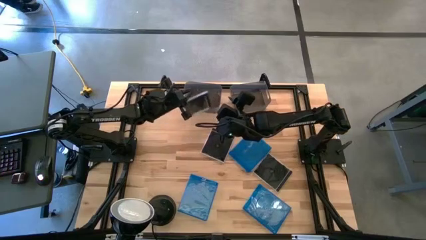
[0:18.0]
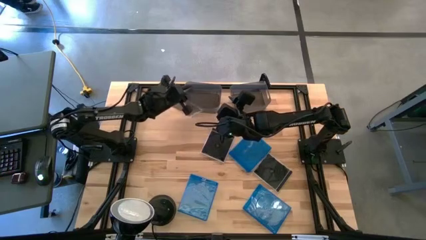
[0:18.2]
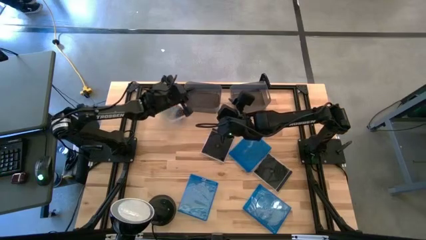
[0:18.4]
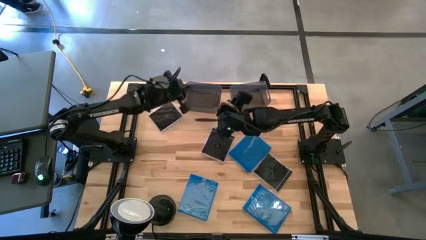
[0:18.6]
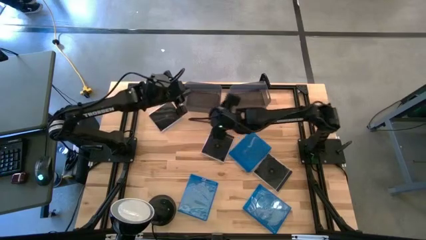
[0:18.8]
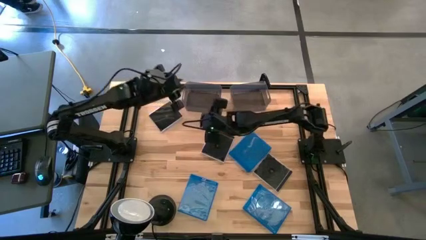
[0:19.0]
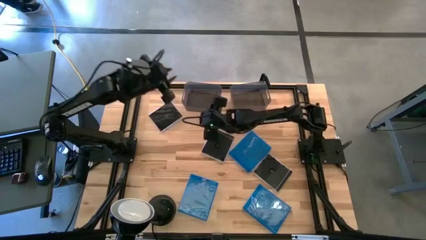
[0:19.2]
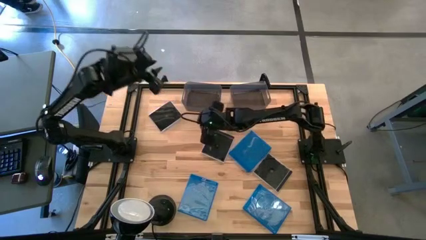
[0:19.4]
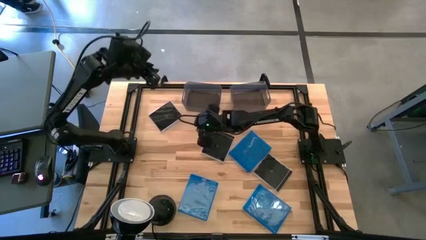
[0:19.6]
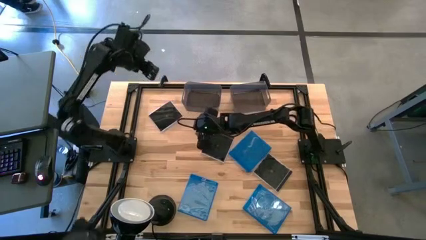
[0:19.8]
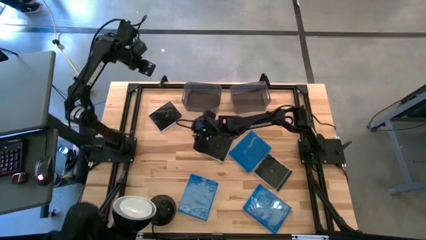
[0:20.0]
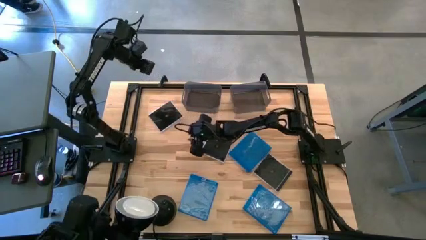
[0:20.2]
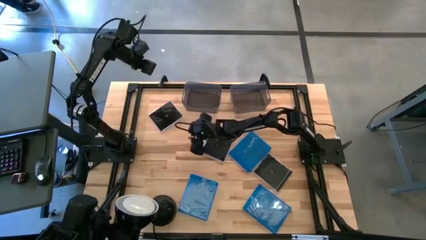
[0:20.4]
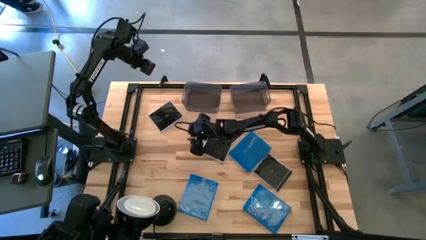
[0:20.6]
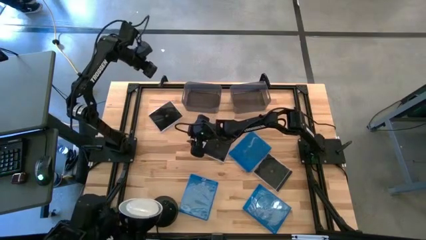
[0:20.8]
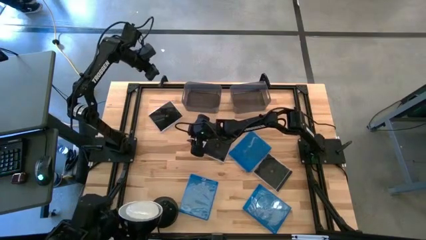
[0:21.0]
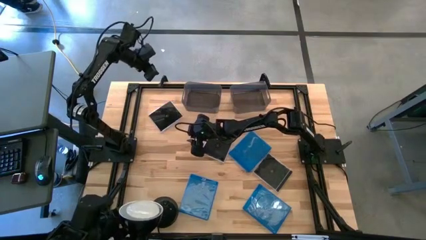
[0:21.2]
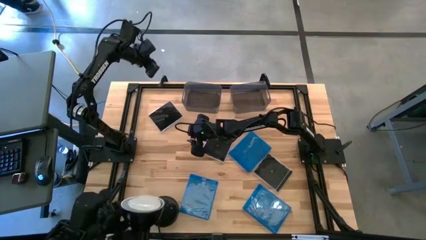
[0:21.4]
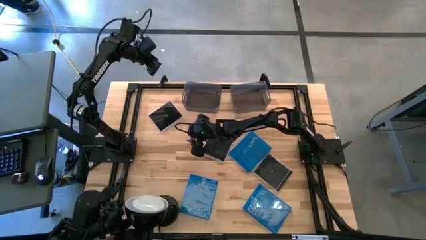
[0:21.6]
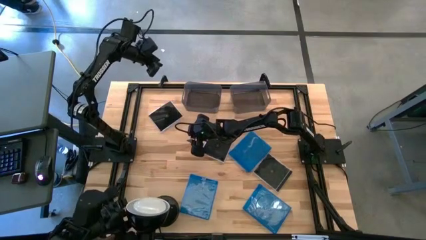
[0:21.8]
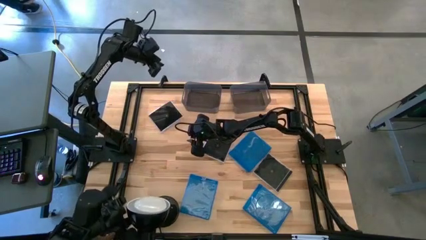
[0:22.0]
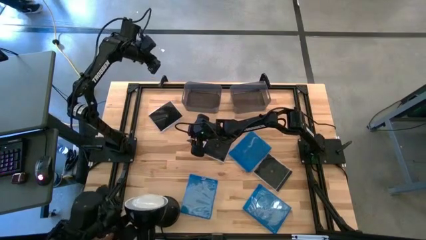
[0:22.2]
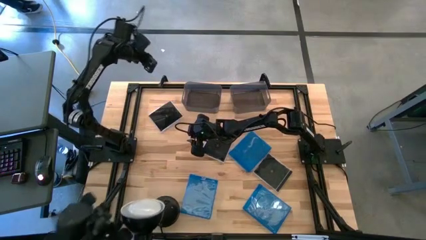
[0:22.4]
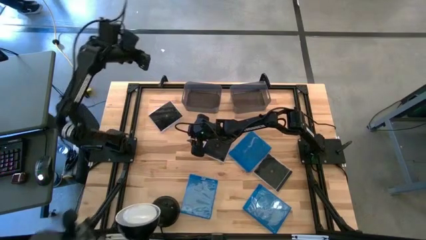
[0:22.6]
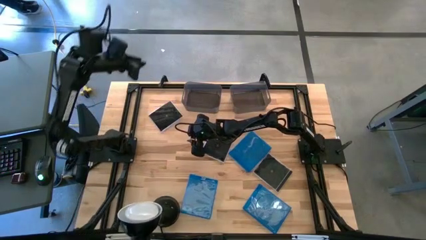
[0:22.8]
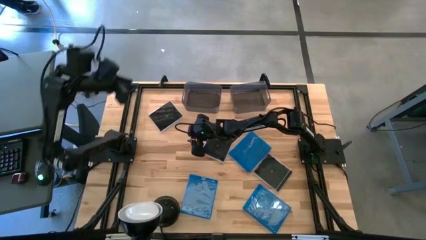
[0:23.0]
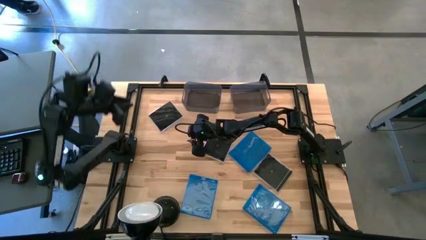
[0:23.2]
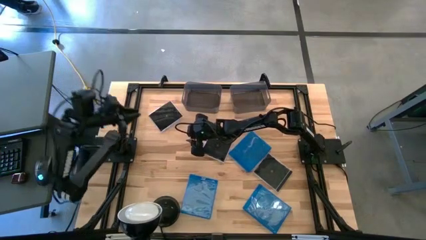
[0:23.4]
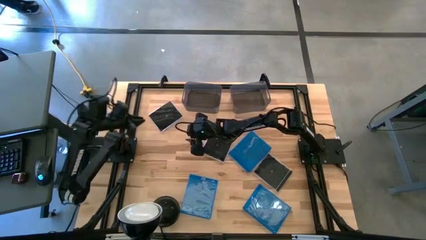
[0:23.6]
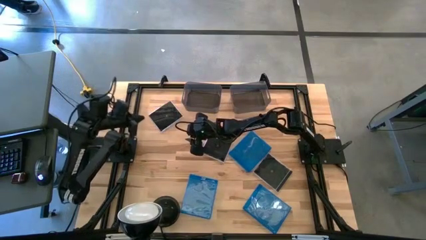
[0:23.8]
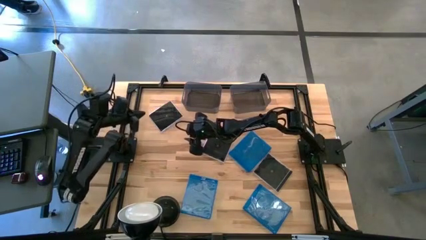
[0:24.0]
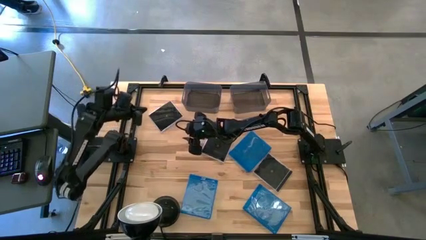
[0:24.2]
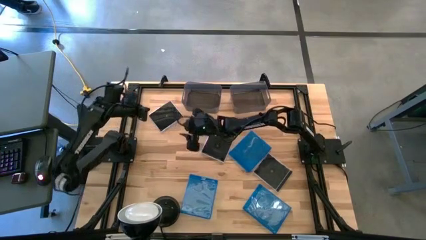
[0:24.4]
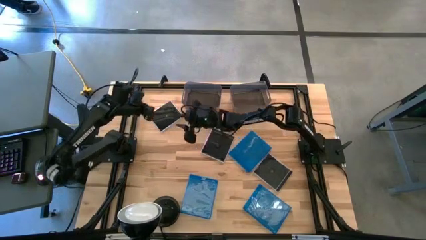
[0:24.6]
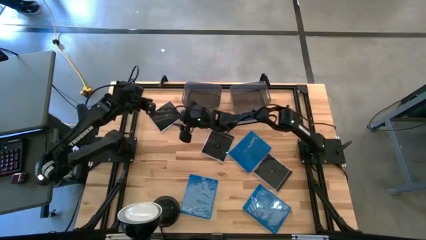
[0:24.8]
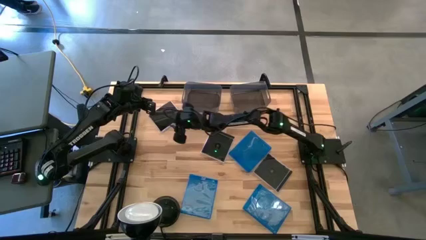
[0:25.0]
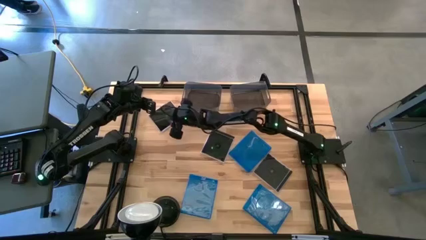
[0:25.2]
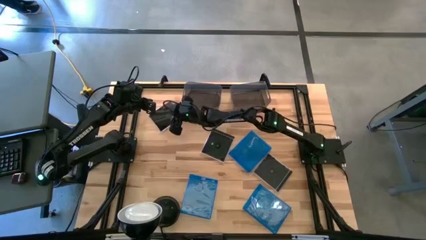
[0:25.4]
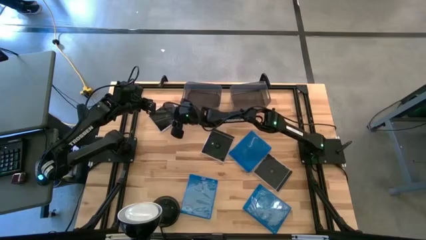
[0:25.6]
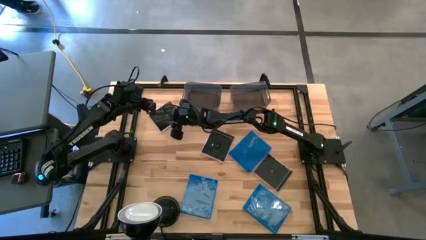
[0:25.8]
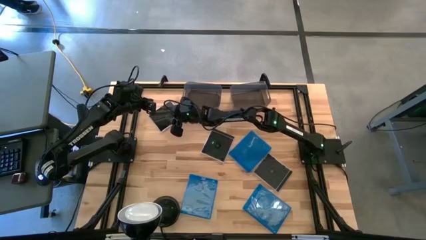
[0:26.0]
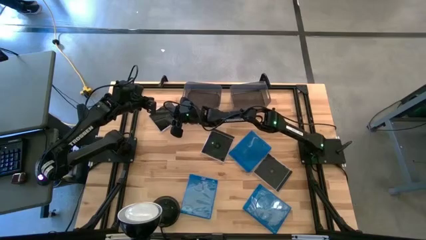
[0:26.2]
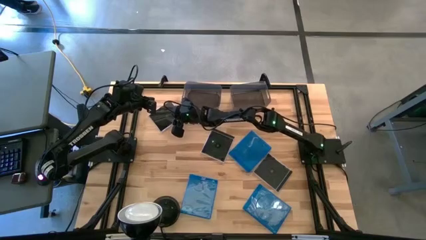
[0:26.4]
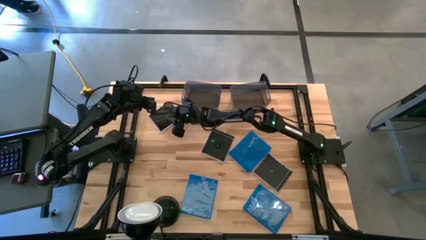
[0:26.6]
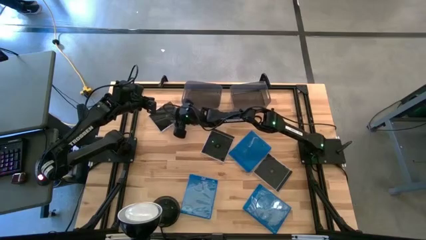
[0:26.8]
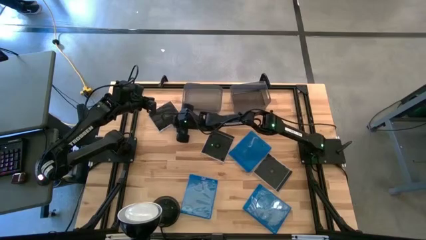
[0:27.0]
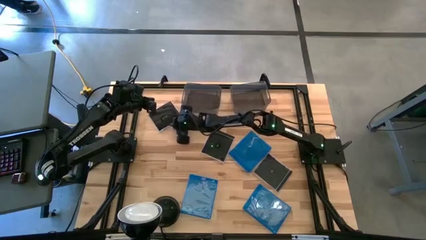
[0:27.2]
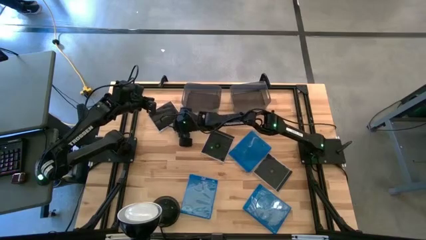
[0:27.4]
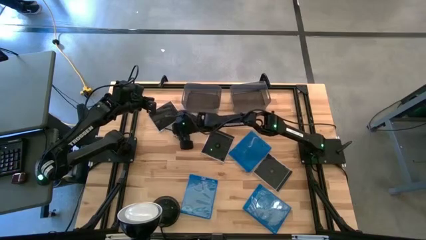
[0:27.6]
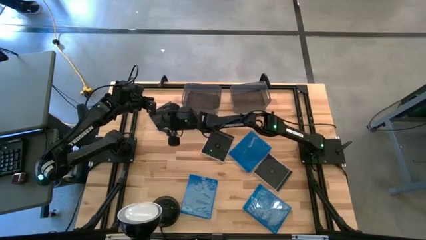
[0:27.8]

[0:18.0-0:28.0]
Task: Pick & place jewel cases by type
Put the top left black cd case into the left black bin
